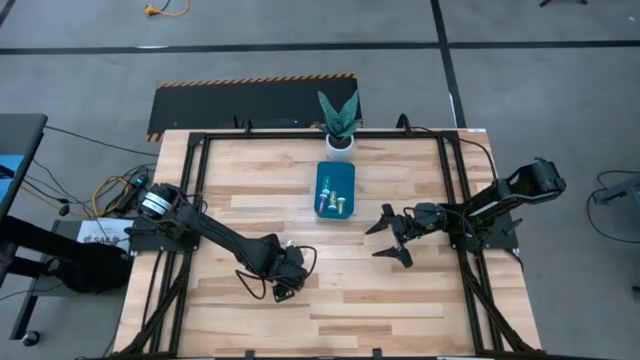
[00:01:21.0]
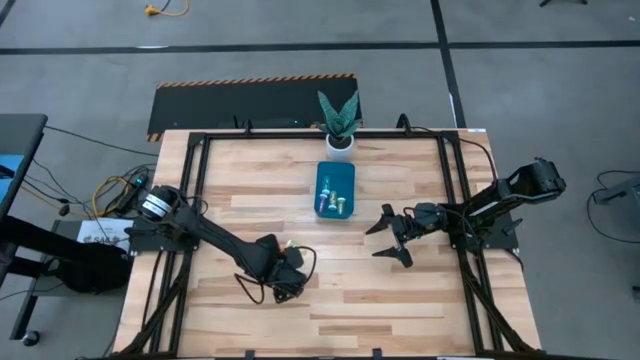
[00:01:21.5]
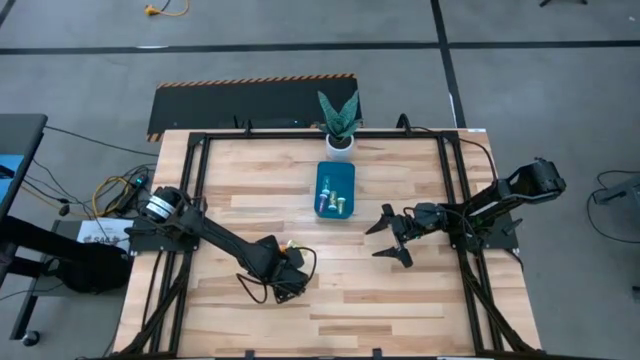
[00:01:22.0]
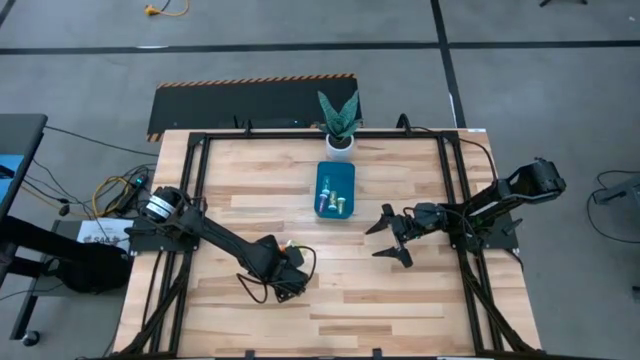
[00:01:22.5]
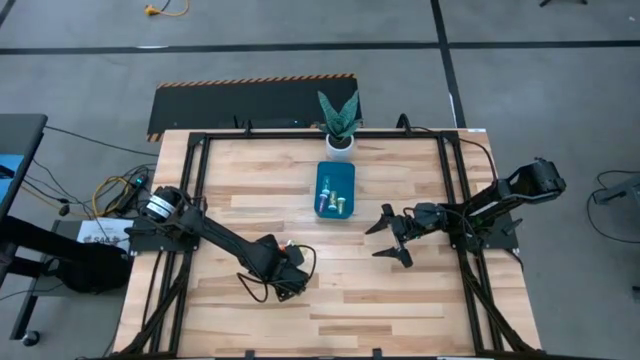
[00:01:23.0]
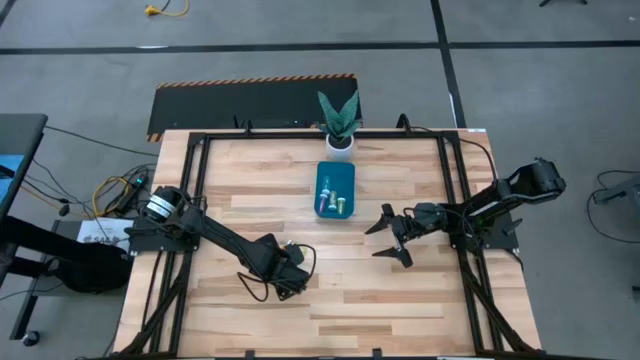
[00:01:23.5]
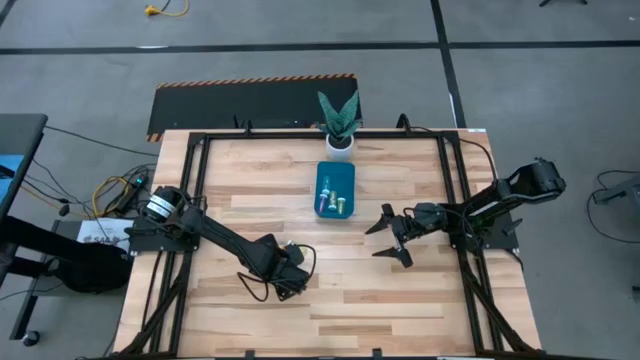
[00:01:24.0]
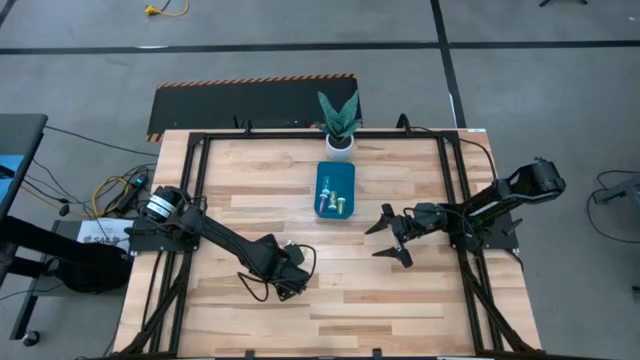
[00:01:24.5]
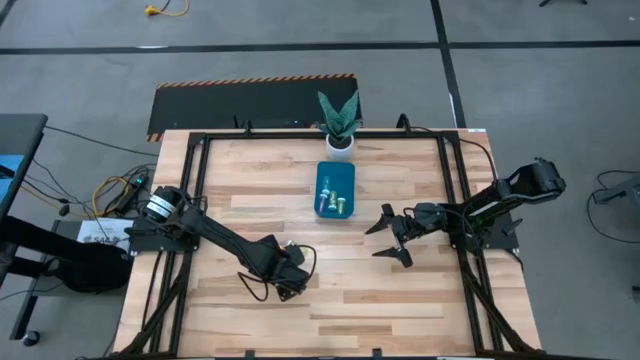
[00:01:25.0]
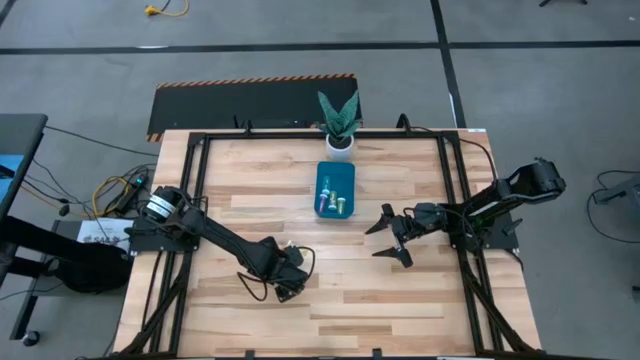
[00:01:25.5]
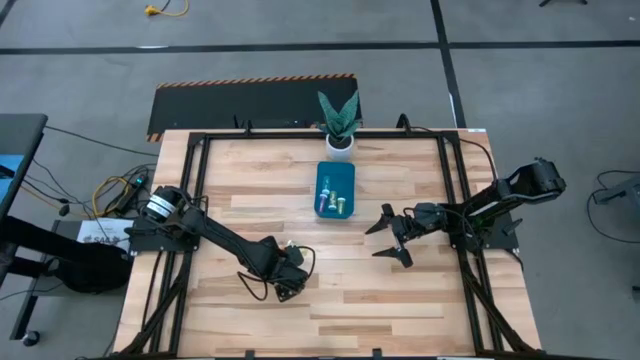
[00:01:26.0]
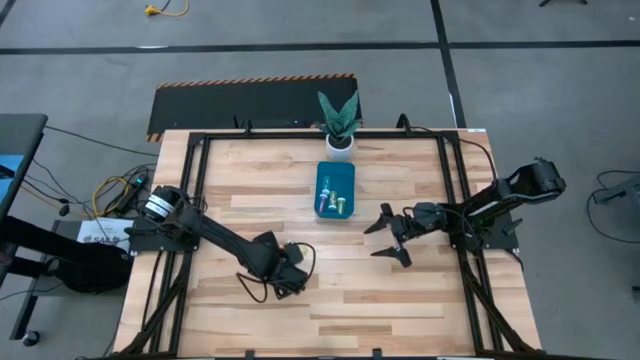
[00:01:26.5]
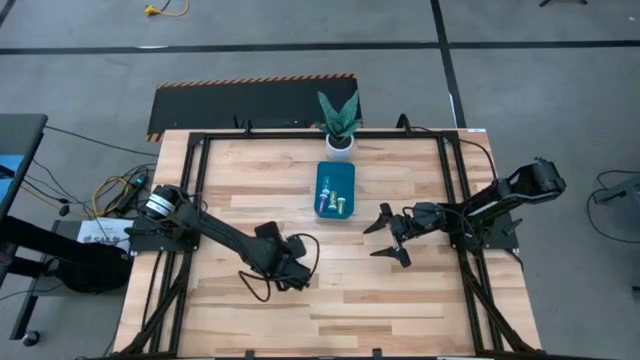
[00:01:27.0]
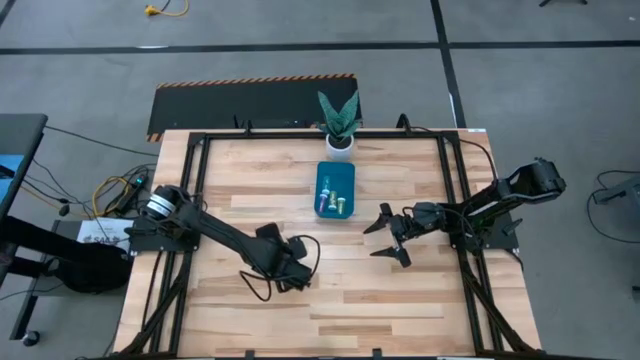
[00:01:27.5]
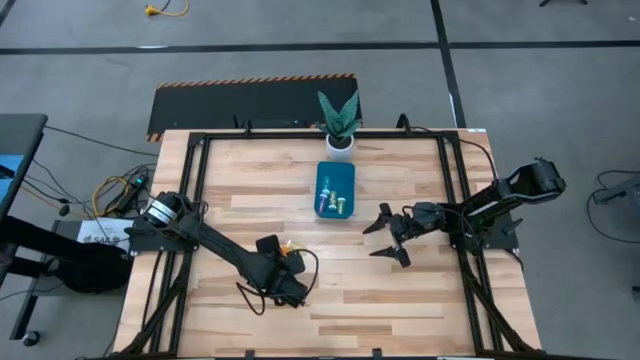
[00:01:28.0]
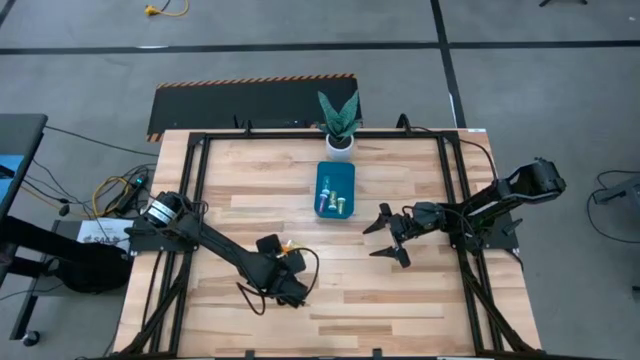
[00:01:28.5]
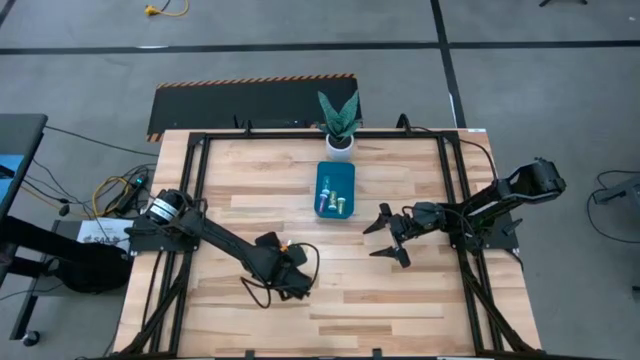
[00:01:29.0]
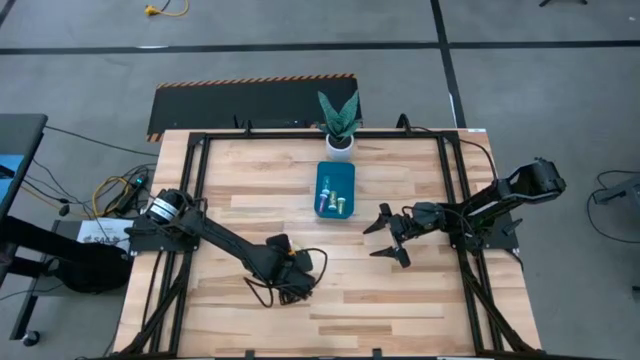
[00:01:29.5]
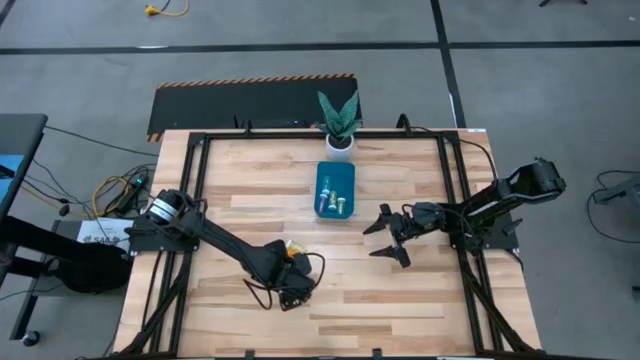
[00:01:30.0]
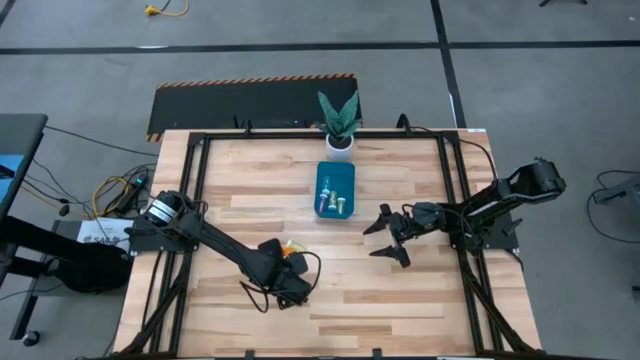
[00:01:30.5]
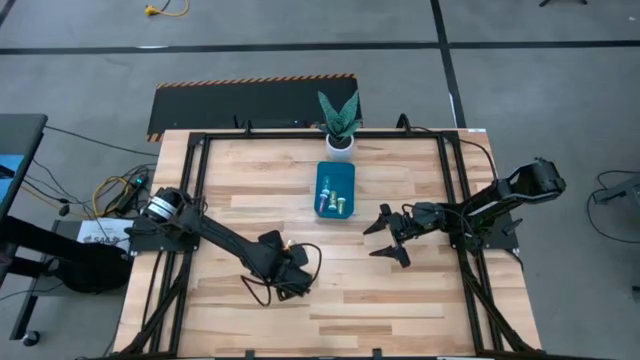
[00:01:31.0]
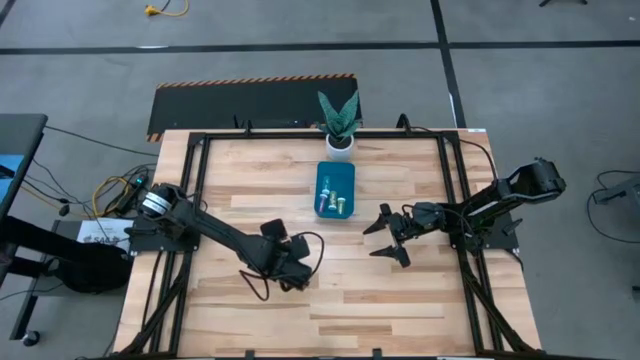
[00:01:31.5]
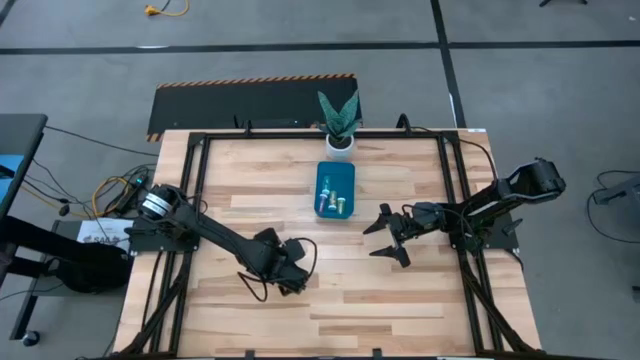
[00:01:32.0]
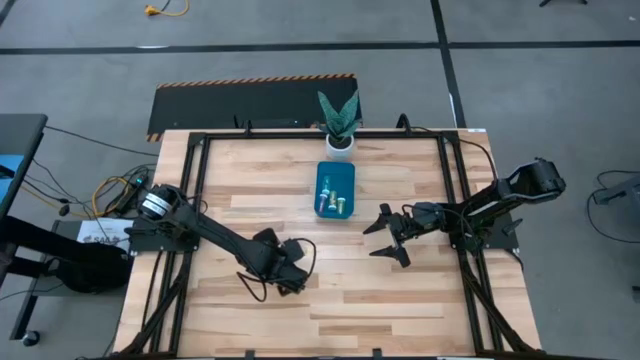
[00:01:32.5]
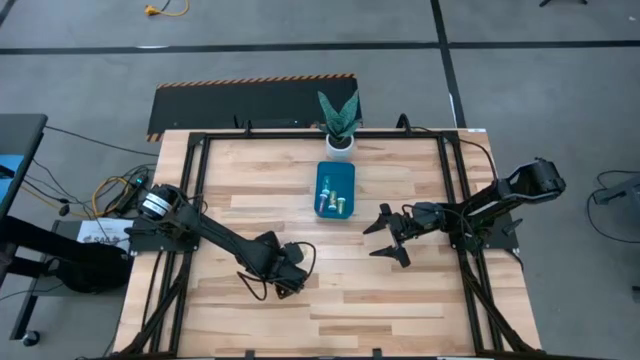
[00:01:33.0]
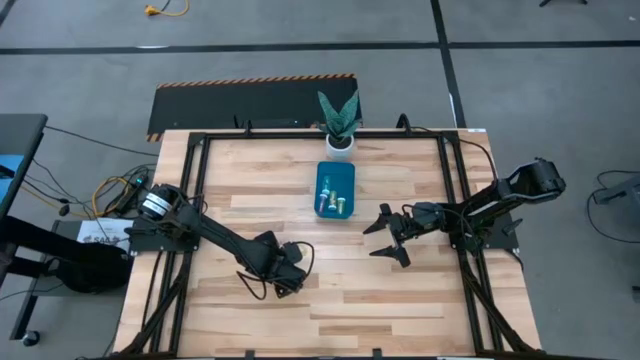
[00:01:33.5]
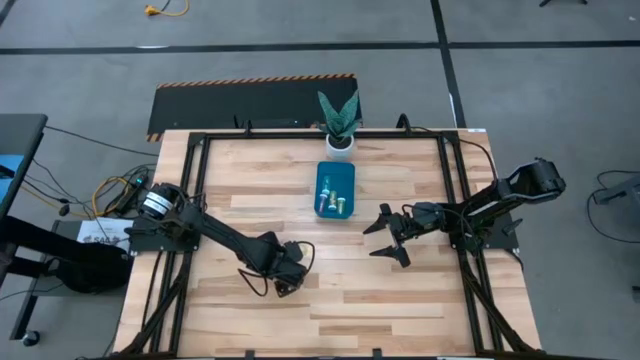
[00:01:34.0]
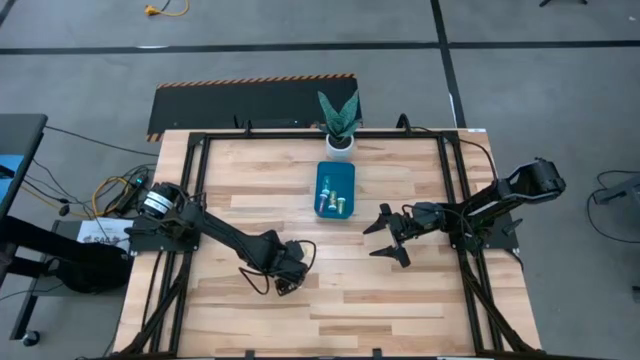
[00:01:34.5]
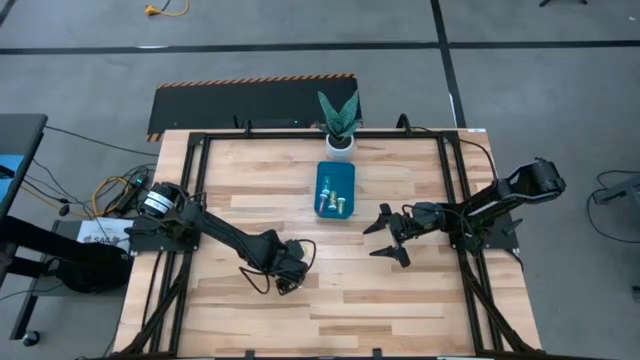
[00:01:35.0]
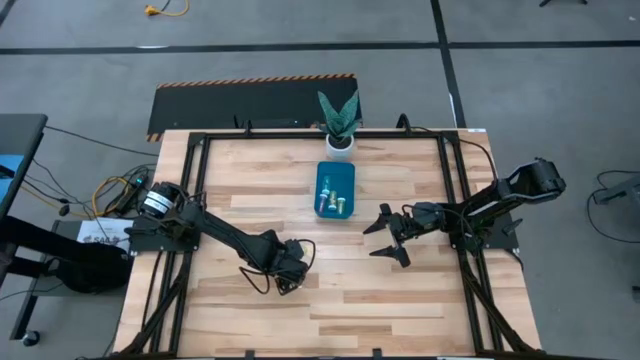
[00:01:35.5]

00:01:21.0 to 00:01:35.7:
Task: Pick and place pill bottles into a basket
Put the blue pill bottle into the bin

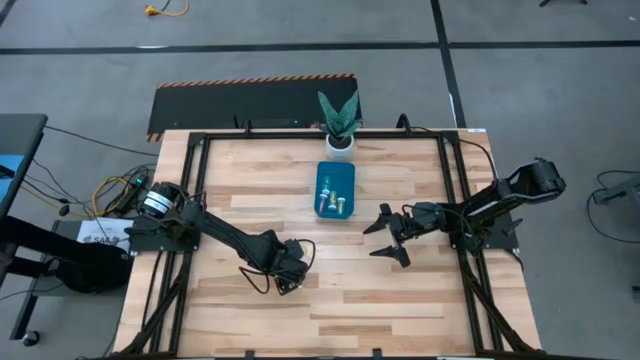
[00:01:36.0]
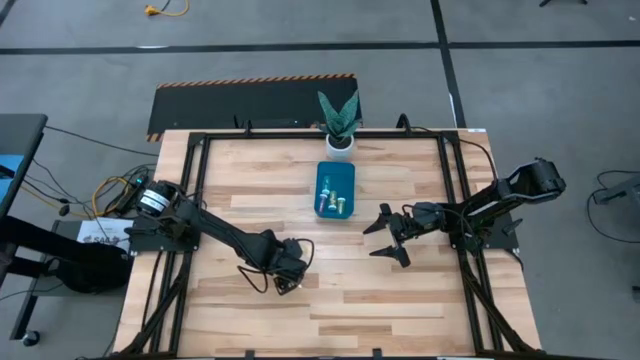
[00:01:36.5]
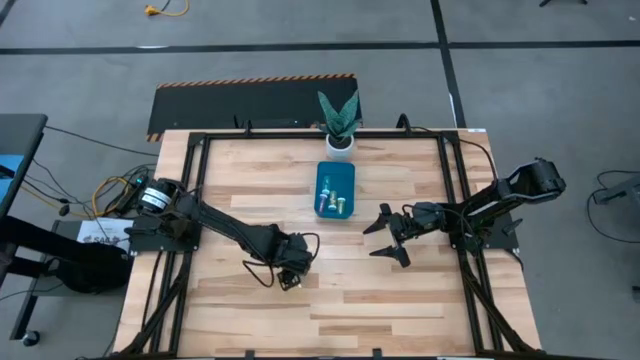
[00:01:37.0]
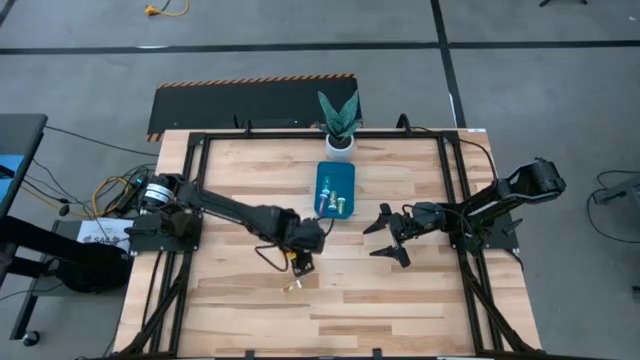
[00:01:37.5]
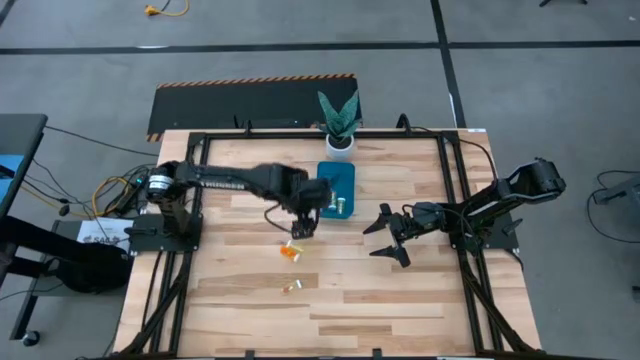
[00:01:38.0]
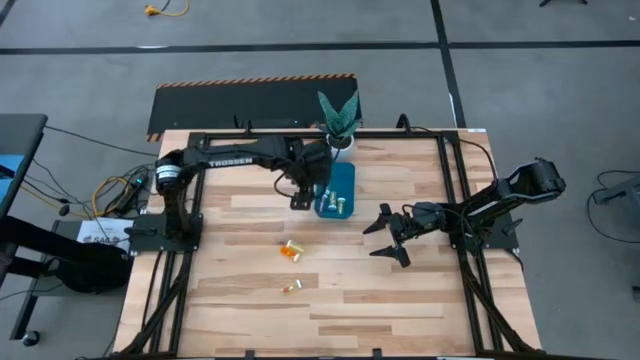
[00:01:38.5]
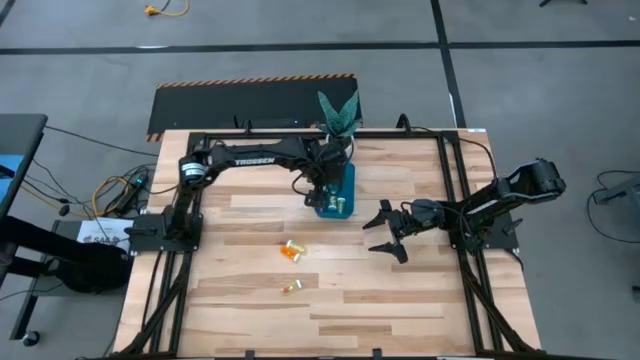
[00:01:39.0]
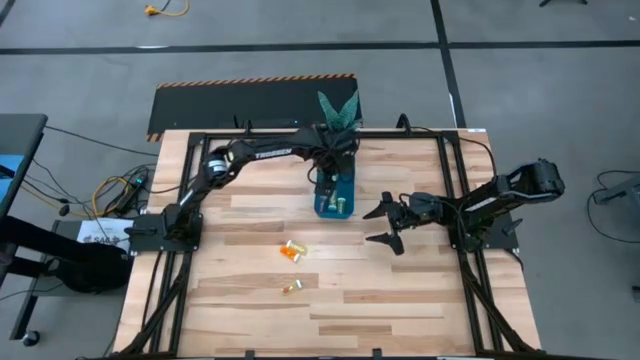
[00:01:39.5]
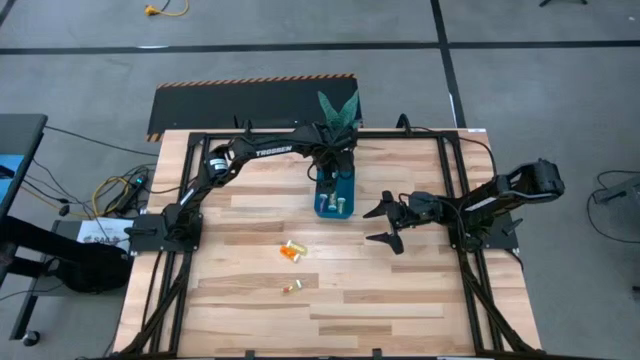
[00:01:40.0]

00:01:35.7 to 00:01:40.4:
Put the blue pill bottle into the bin
